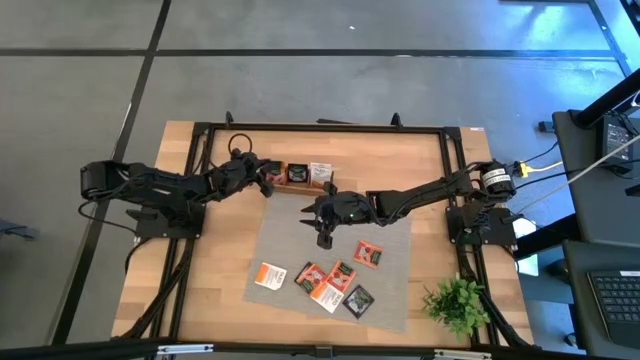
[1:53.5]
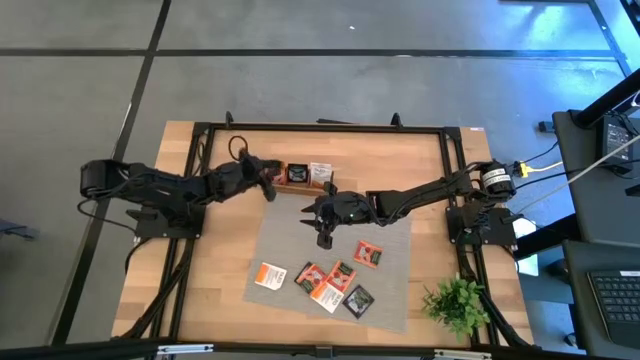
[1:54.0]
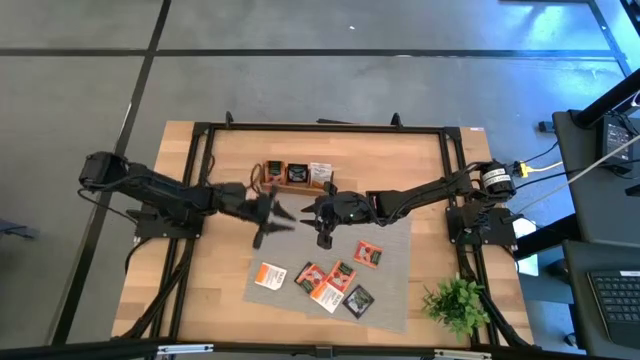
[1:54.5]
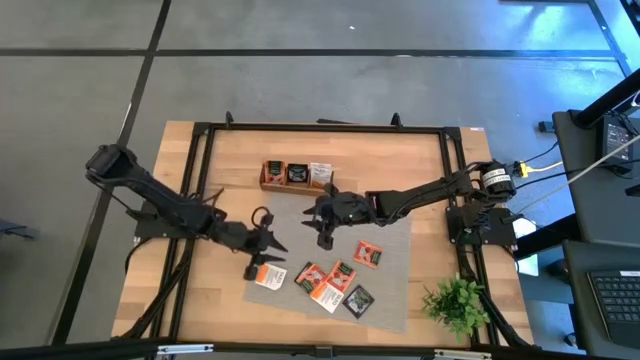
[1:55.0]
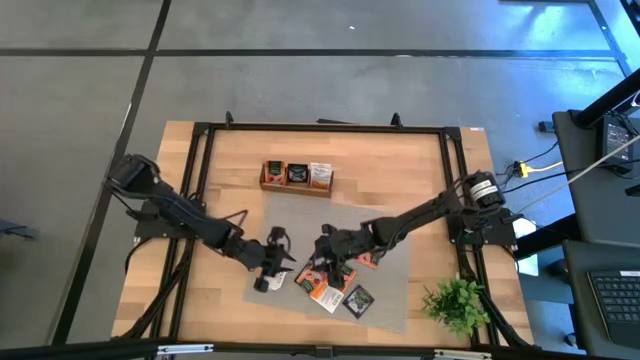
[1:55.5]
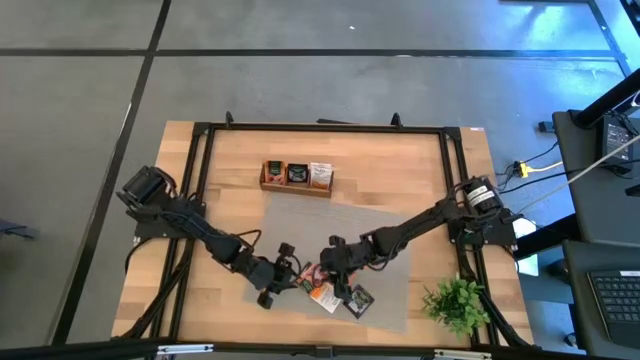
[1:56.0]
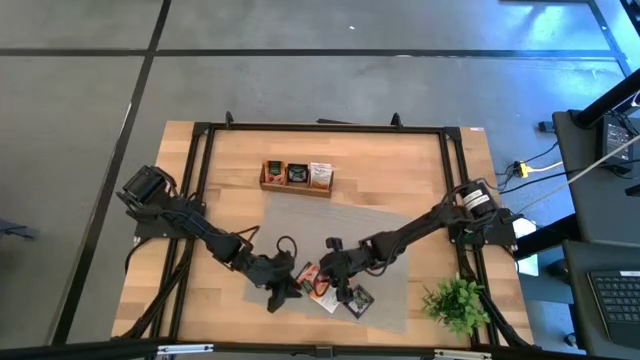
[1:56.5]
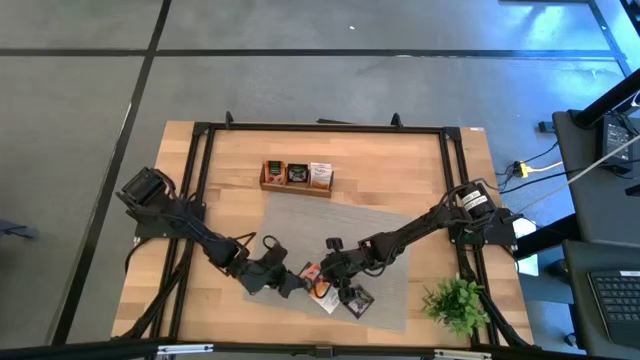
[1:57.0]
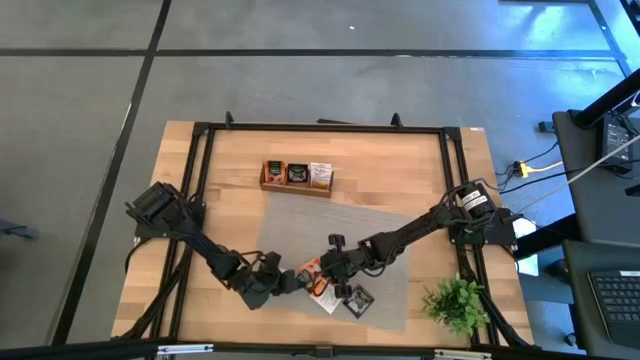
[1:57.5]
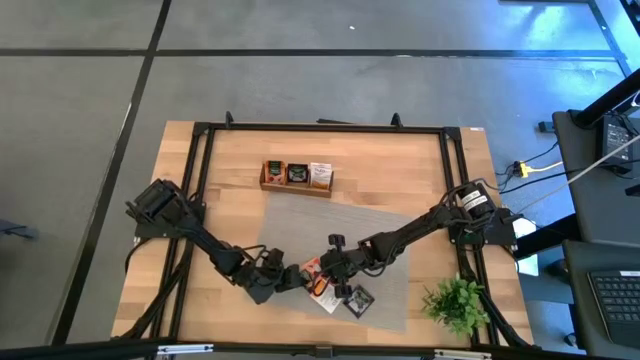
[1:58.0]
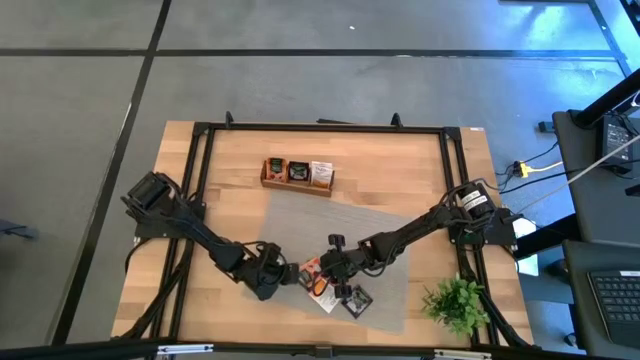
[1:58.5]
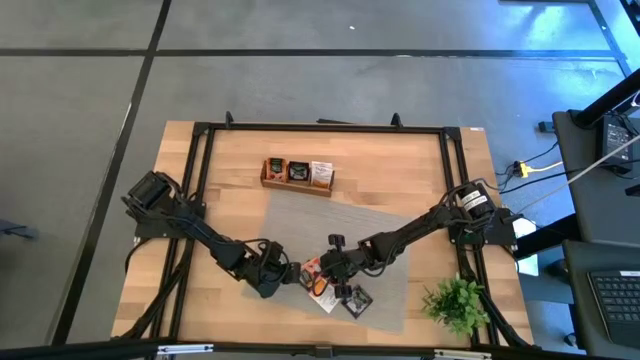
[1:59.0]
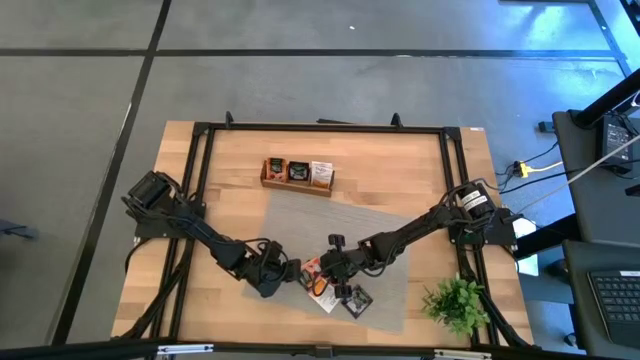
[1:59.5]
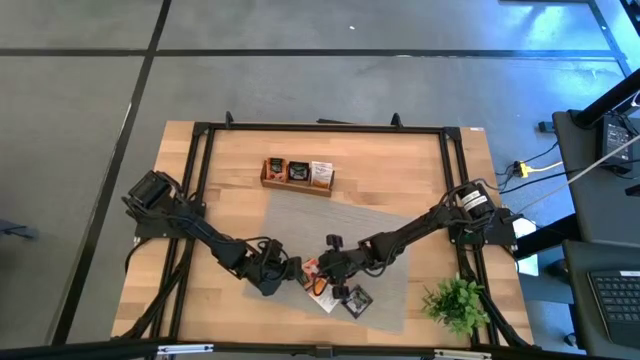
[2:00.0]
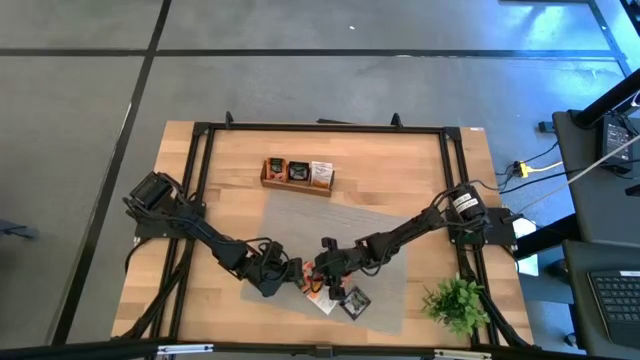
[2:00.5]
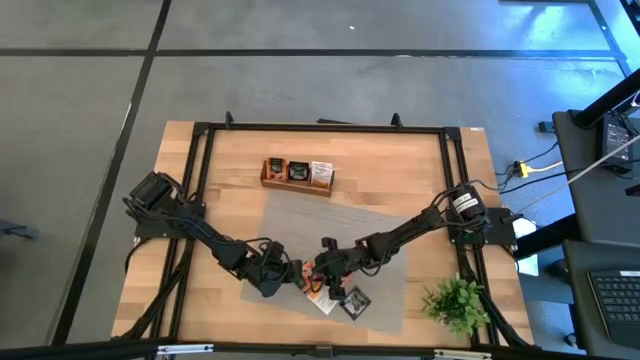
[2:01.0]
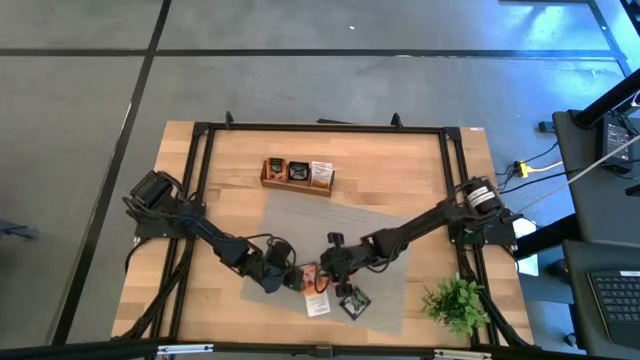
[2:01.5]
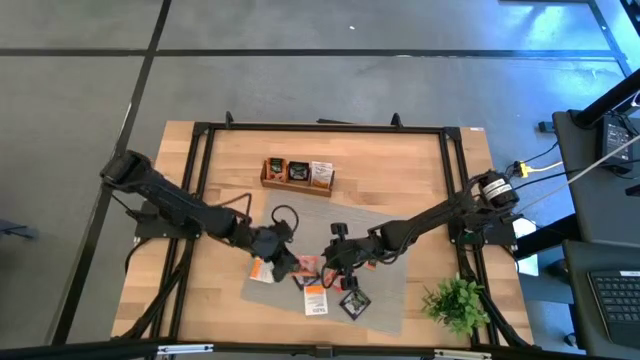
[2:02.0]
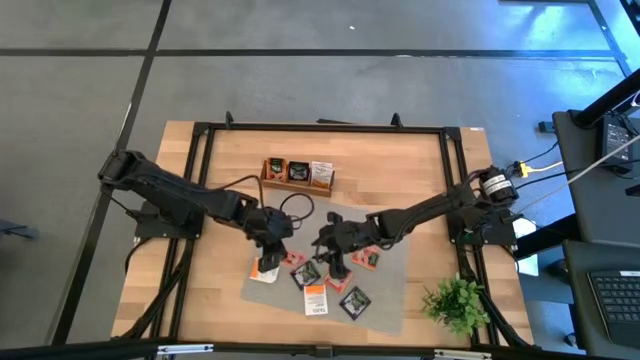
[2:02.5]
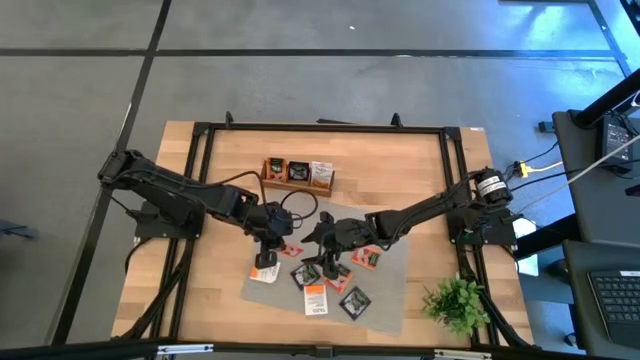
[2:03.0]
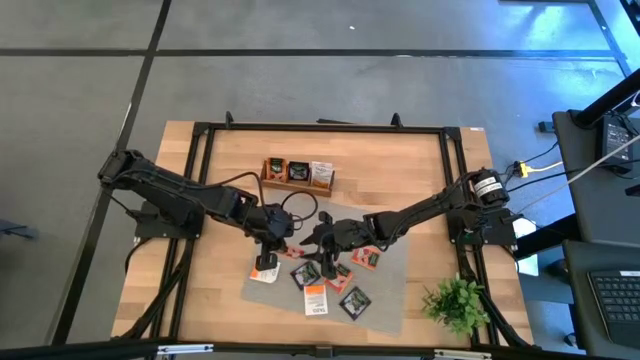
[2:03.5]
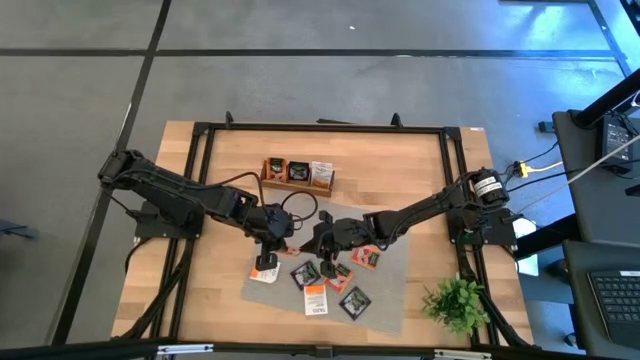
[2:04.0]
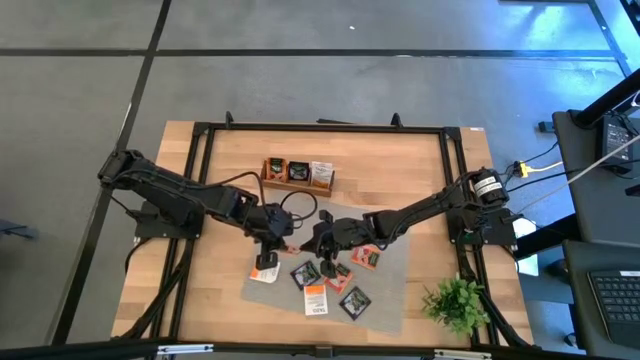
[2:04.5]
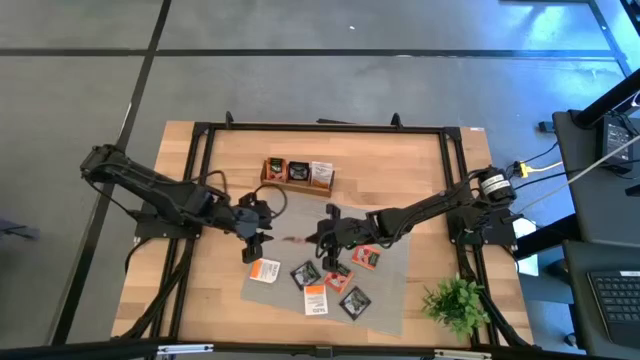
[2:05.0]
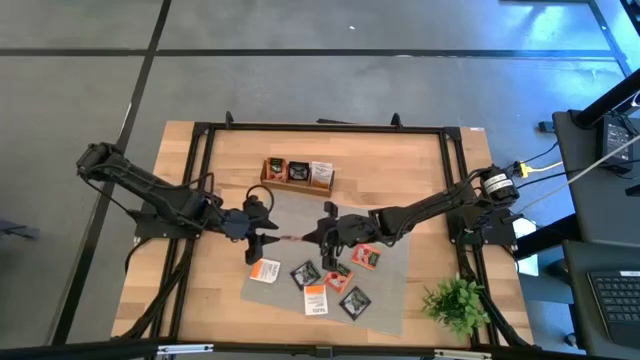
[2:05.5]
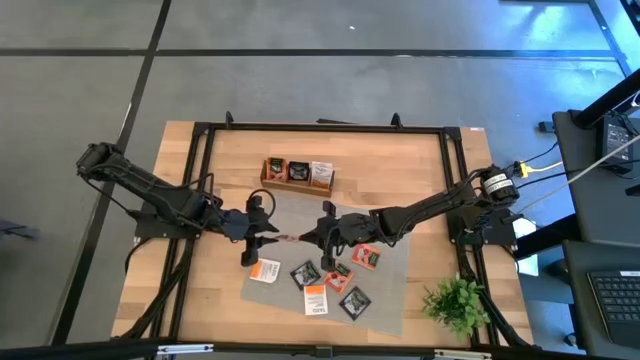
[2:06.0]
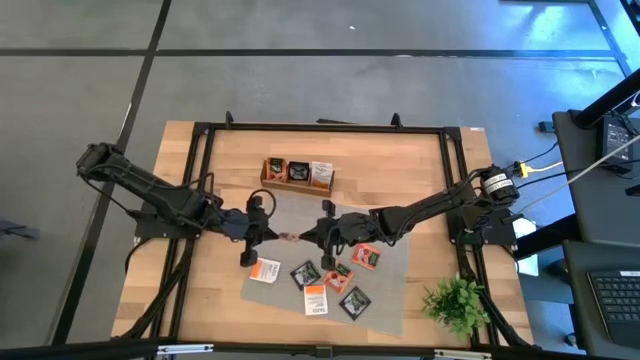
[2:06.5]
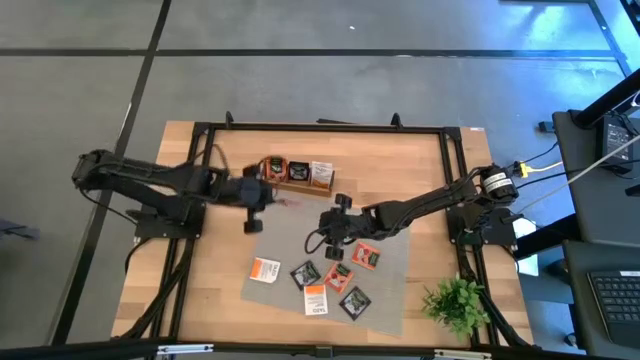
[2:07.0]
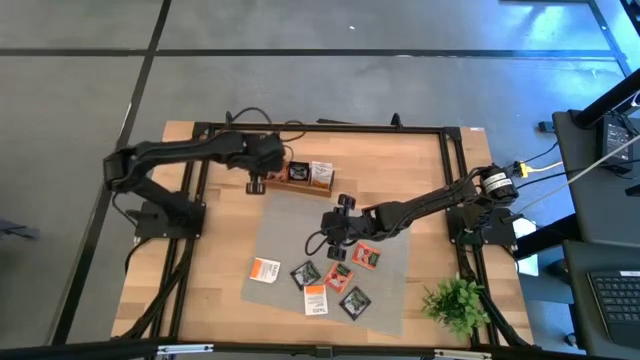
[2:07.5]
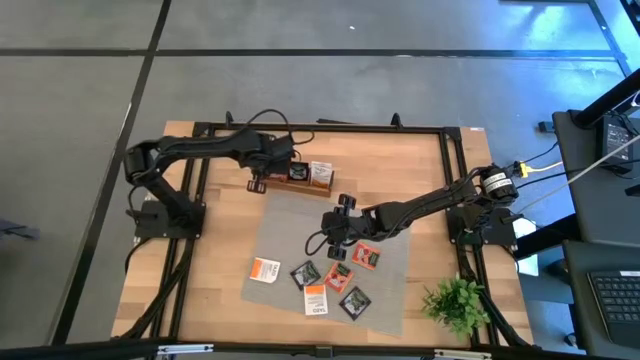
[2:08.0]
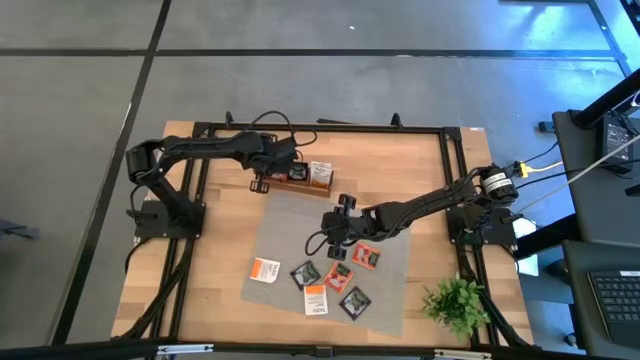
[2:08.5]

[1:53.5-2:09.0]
Task: Pick & Place Tea
Put the orange tea bag into the left section of the wooden organizer

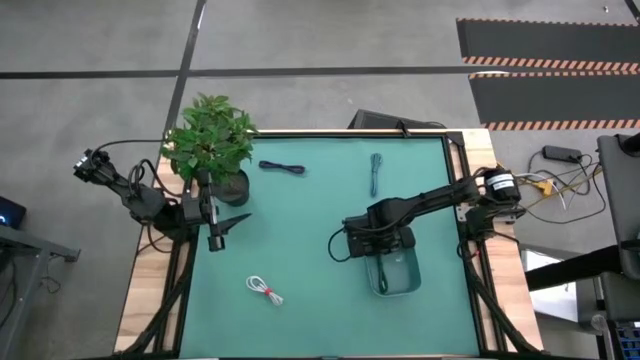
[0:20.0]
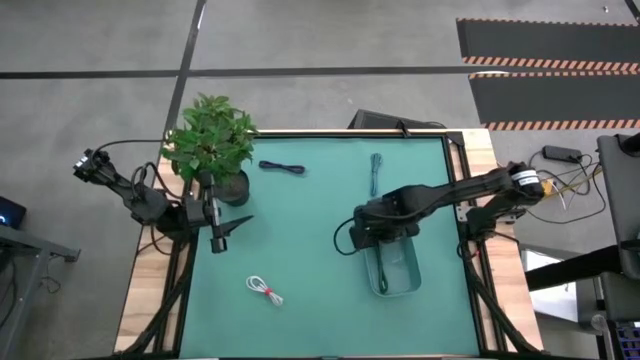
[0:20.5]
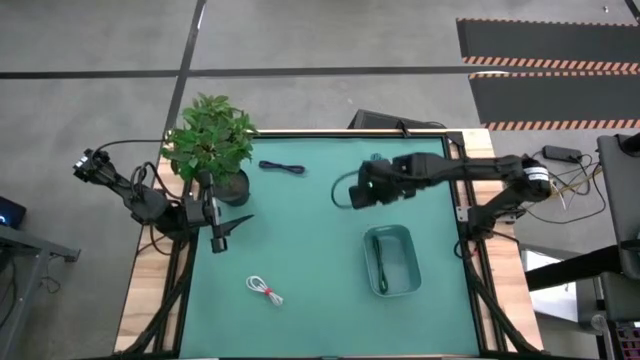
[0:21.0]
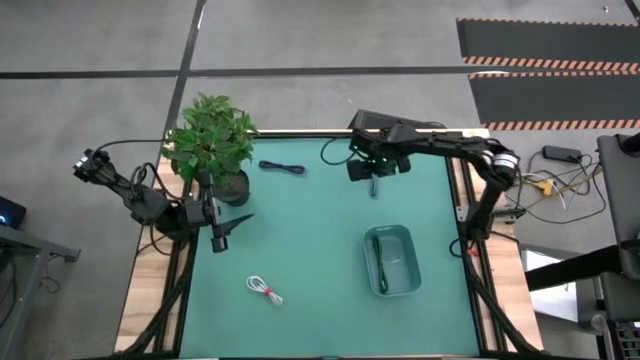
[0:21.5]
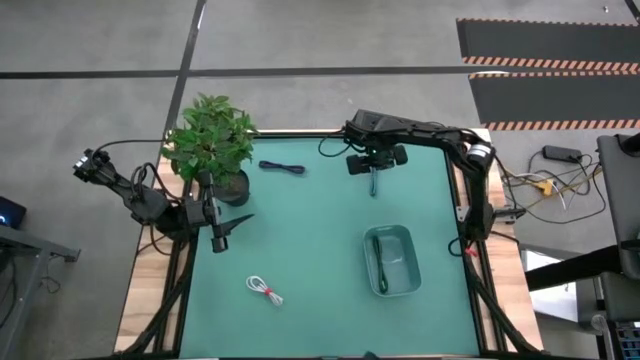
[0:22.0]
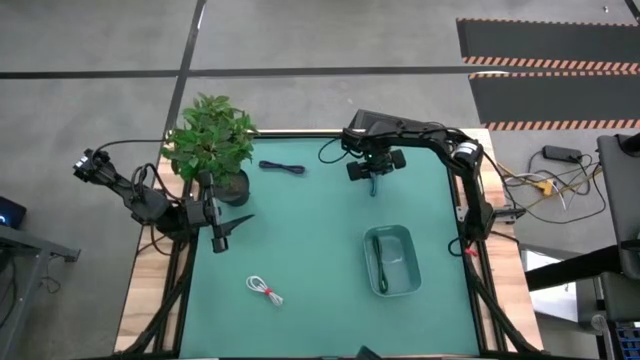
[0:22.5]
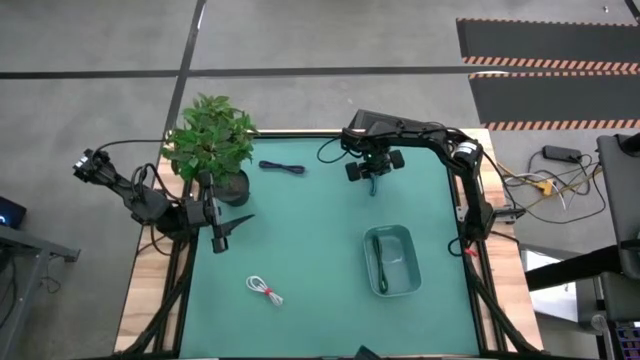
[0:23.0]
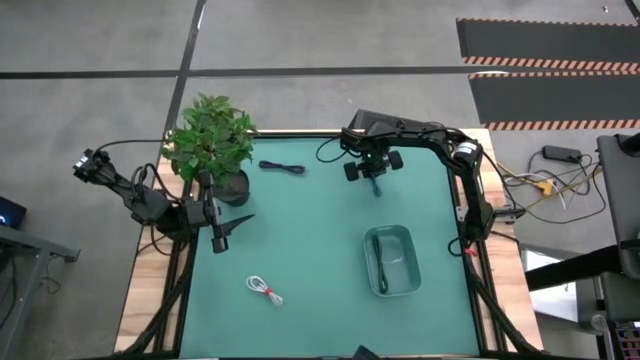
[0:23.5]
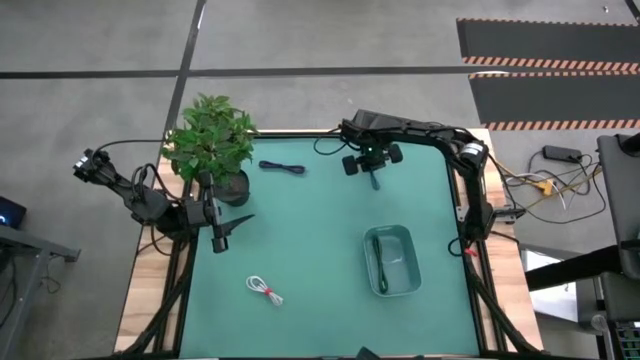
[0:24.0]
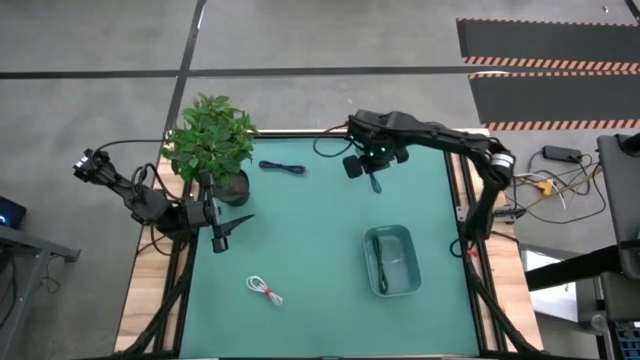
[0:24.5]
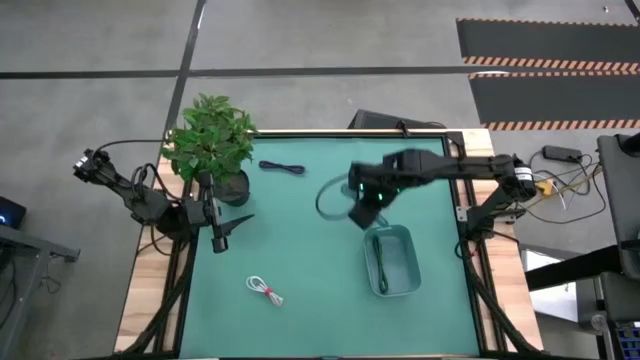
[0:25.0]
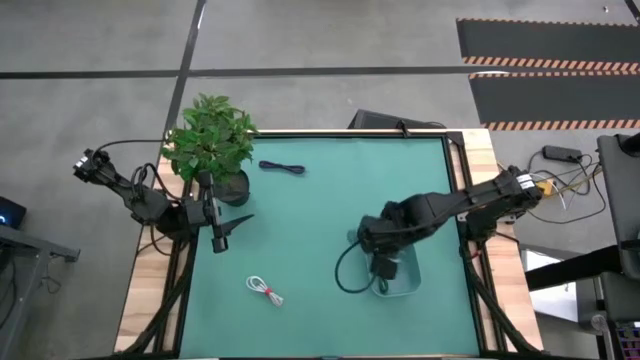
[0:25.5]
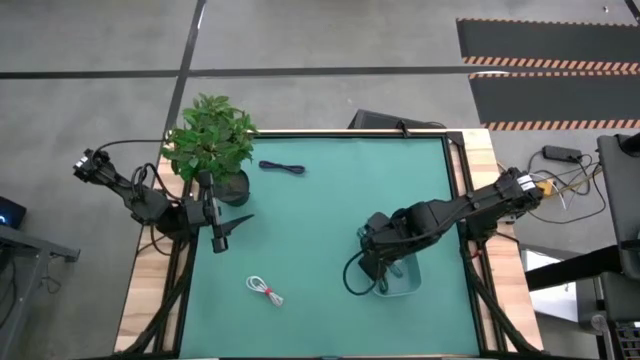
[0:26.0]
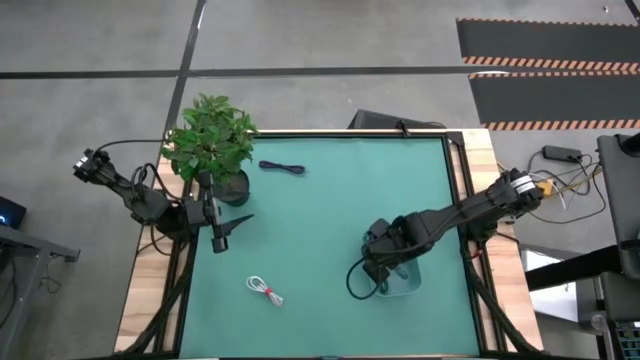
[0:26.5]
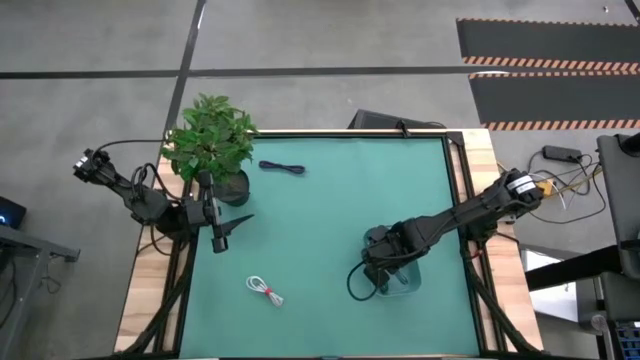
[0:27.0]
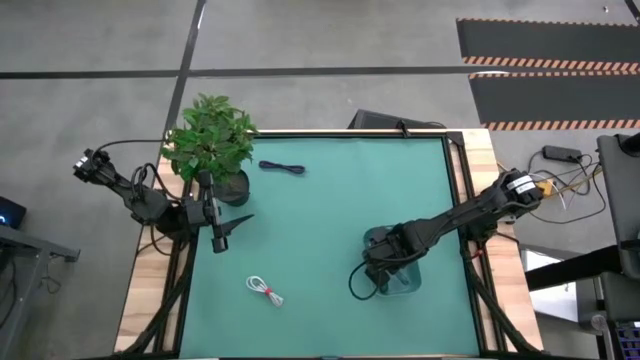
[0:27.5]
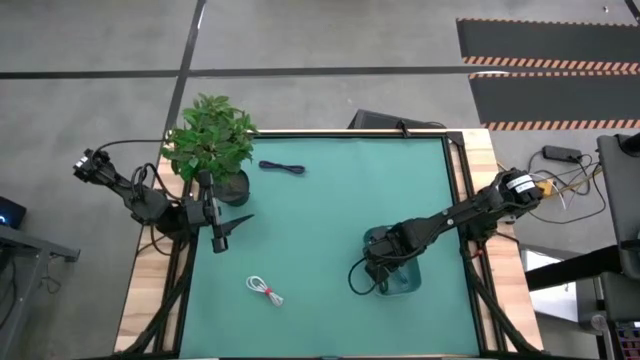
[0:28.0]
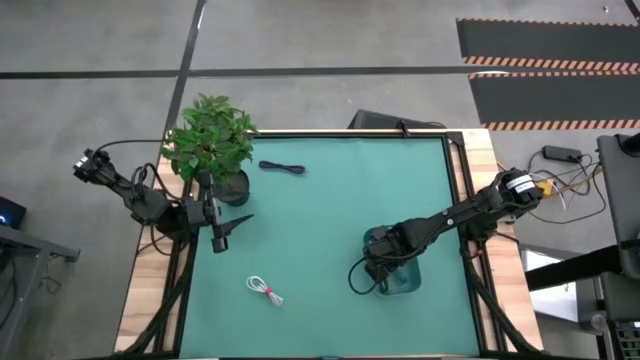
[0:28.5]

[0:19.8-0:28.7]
Task: Pick and place USB-C Cables
Put the blue charger cable into the blue bin
